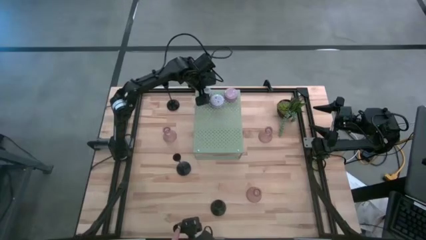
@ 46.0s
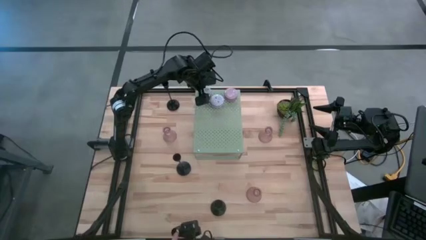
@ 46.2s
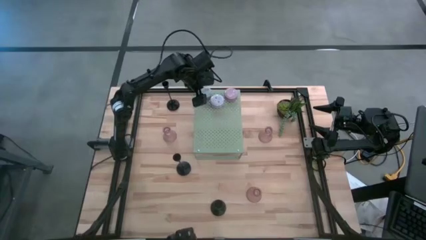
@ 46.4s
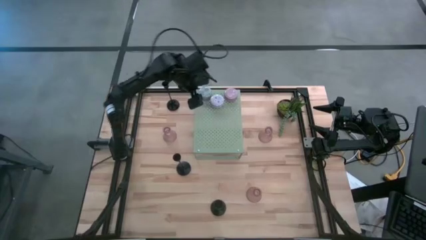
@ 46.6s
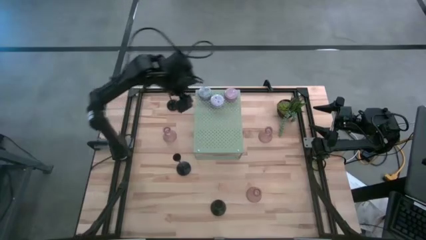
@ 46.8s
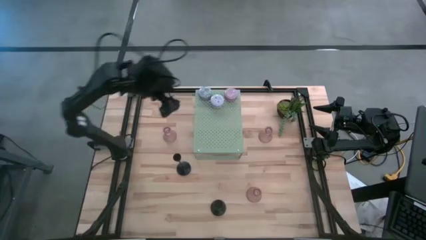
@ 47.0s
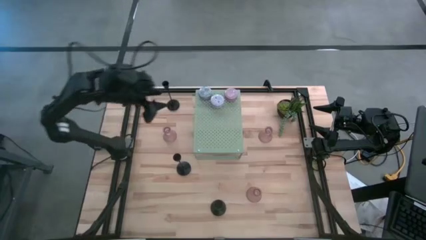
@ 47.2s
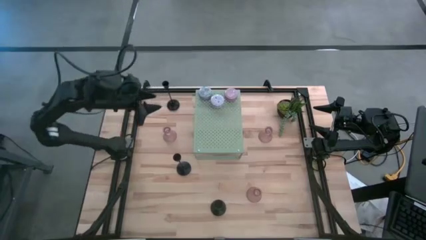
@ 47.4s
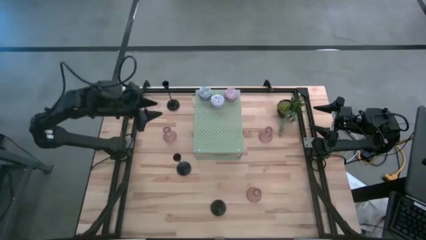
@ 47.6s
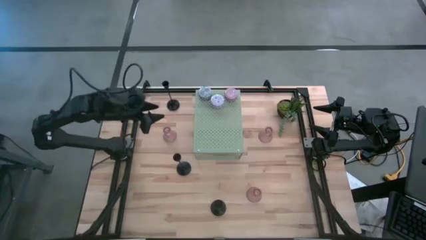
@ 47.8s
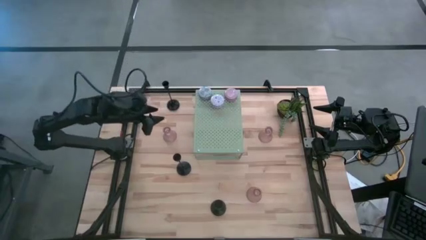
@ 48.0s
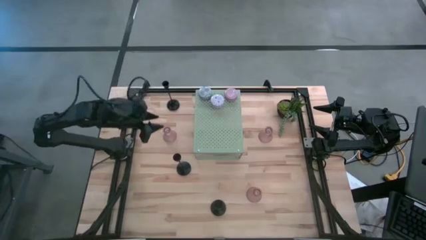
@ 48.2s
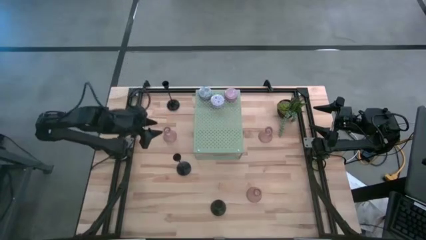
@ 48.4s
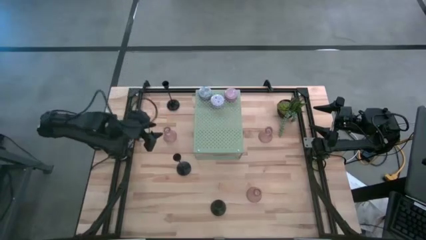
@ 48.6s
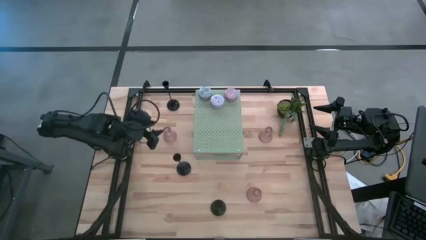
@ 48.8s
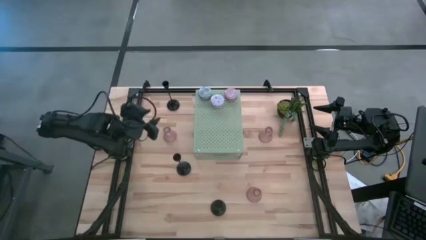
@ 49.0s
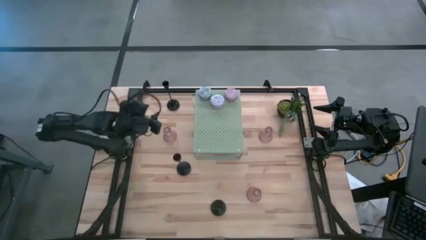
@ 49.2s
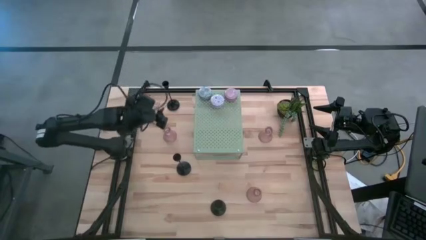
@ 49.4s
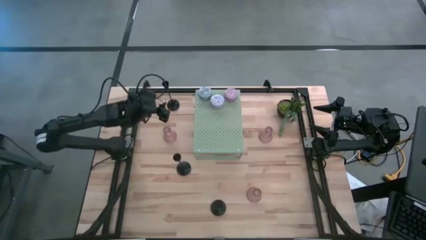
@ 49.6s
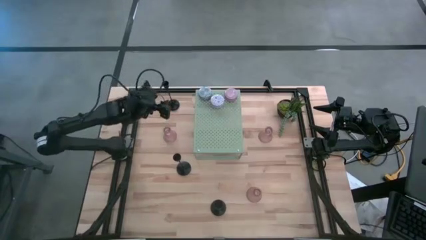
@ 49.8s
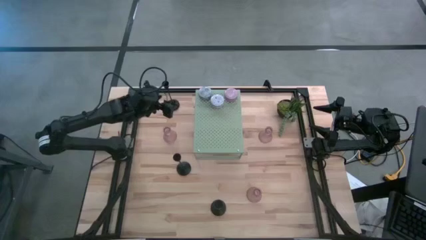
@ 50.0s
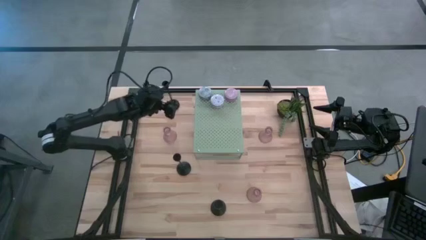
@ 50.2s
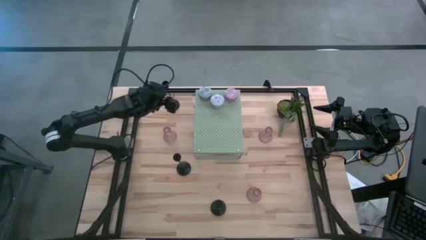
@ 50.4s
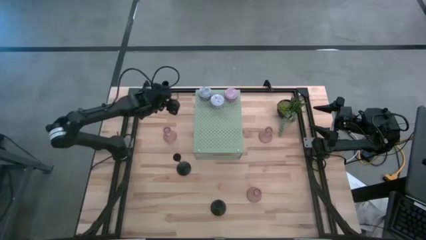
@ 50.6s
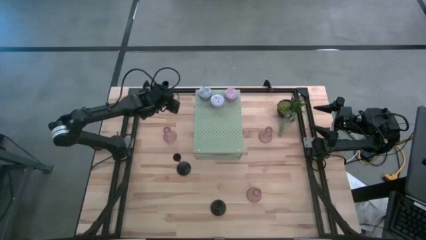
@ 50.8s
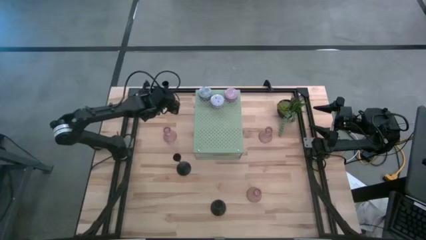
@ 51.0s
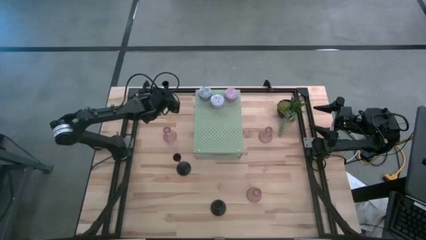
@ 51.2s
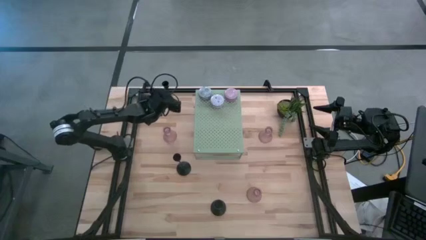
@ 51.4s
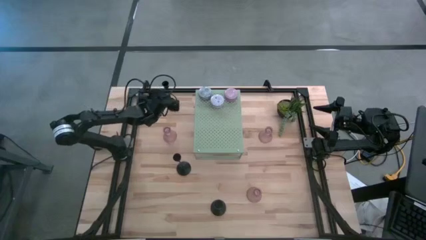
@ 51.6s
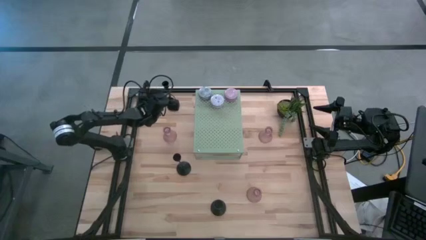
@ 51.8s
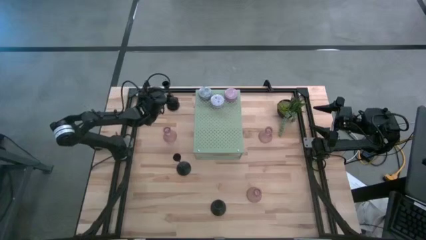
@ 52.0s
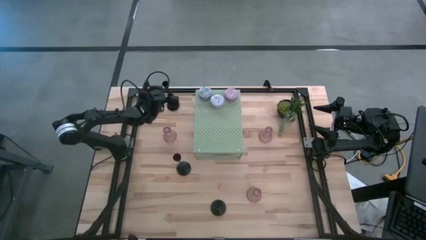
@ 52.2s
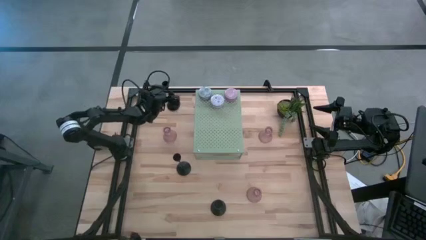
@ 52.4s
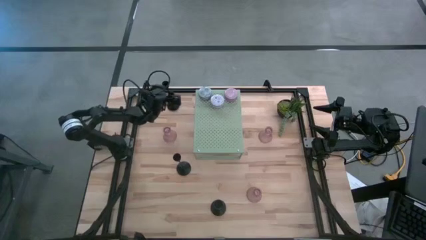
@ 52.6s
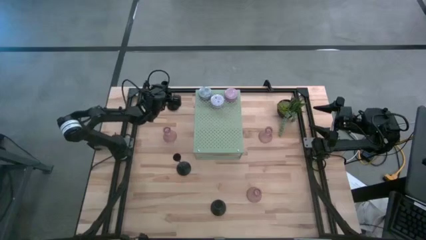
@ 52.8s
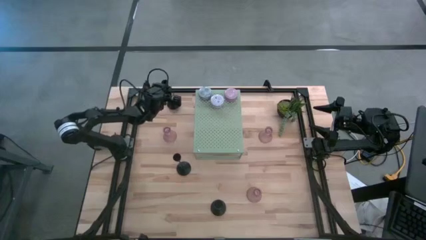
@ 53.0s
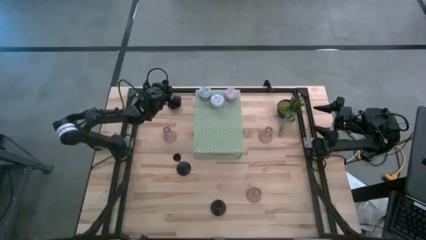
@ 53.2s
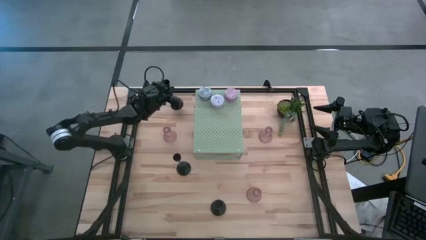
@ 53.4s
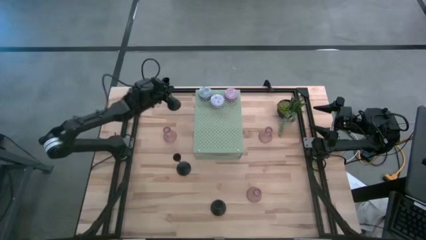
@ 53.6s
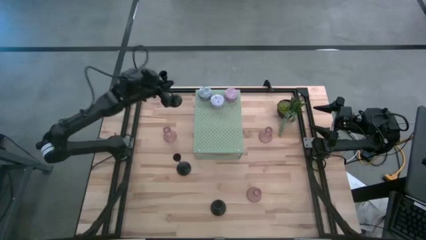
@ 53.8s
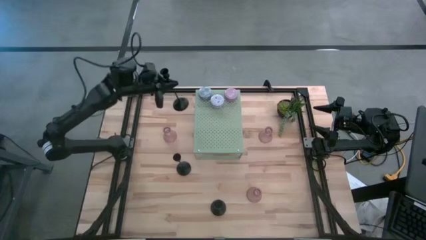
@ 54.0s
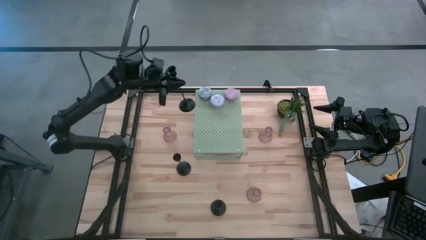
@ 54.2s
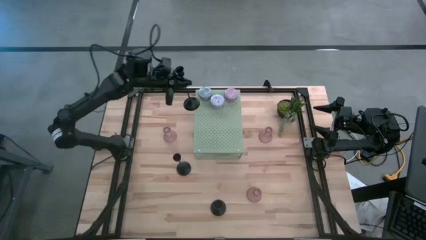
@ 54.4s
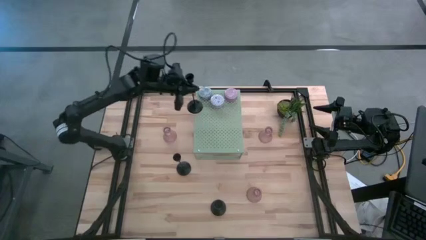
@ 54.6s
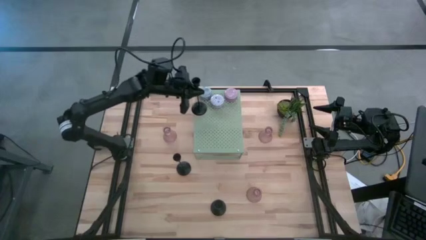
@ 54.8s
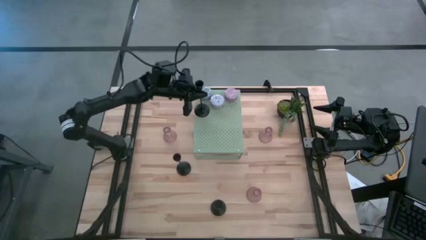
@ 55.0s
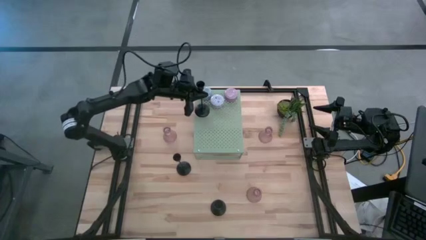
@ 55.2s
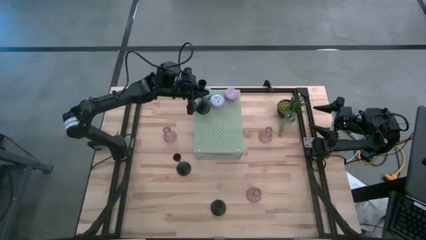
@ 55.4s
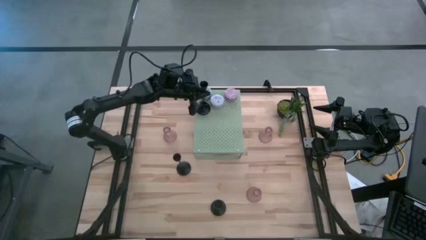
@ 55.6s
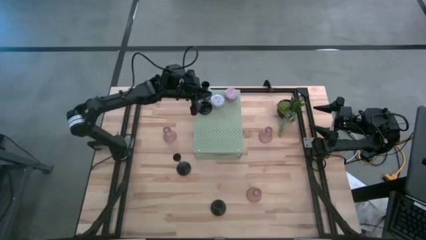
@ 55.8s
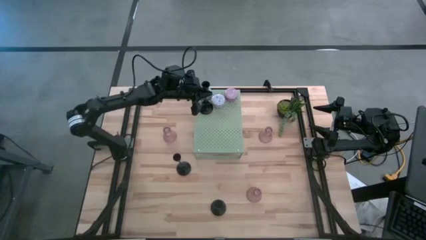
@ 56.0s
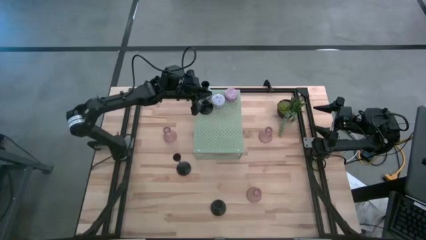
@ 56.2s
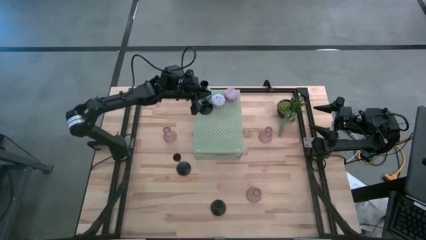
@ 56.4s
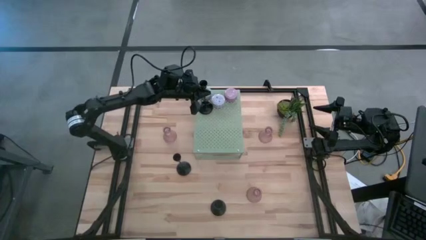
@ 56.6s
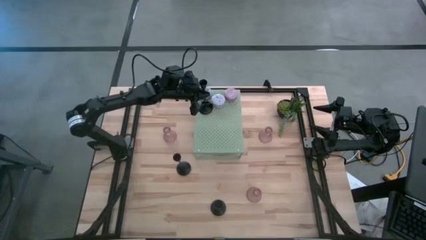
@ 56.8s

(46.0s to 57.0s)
Task: Pick & Place candle stick holders
Put the top black candle holder on the shelf
